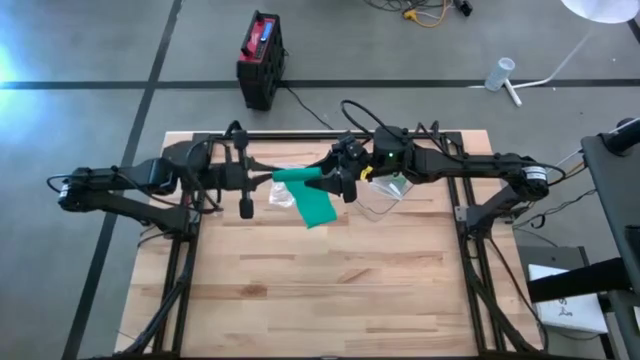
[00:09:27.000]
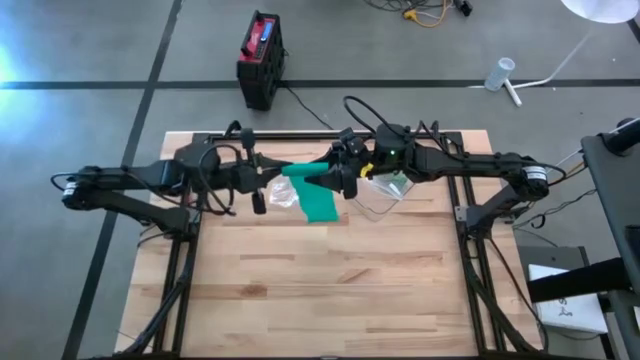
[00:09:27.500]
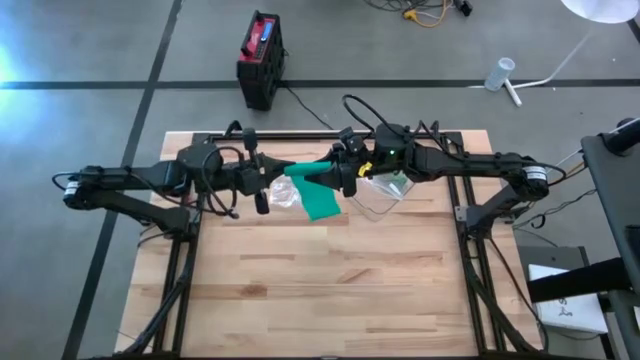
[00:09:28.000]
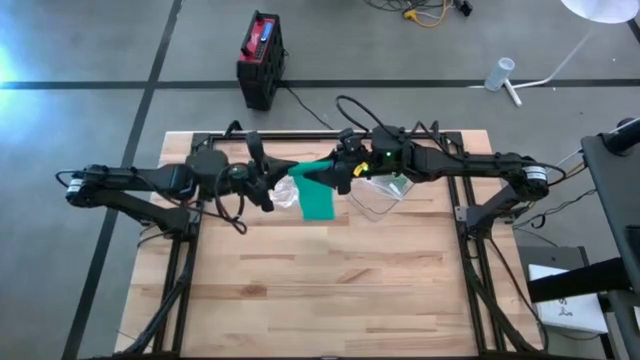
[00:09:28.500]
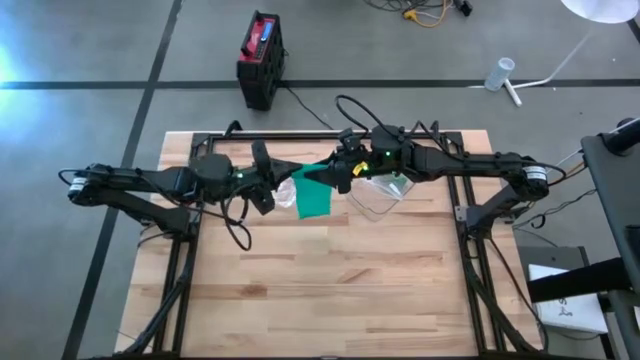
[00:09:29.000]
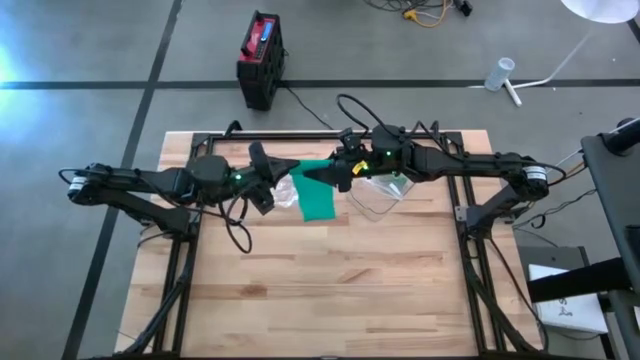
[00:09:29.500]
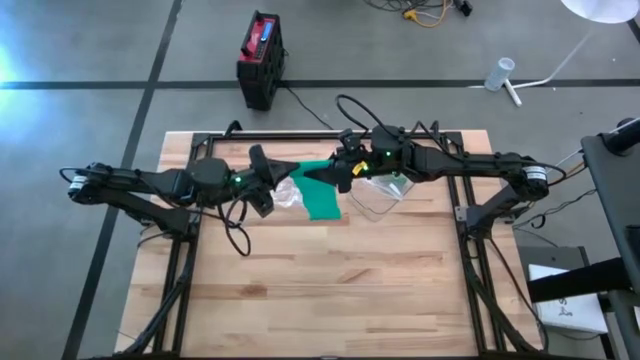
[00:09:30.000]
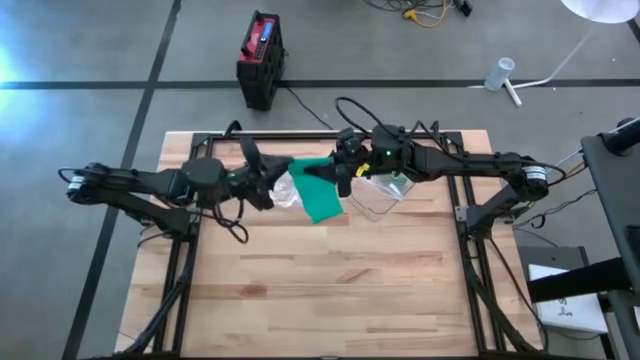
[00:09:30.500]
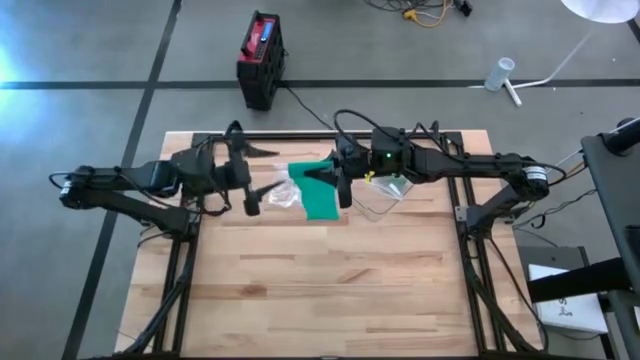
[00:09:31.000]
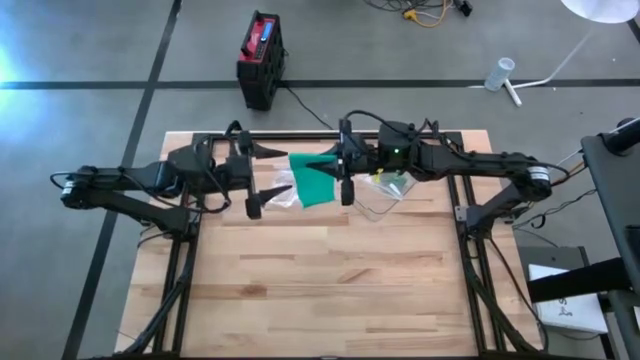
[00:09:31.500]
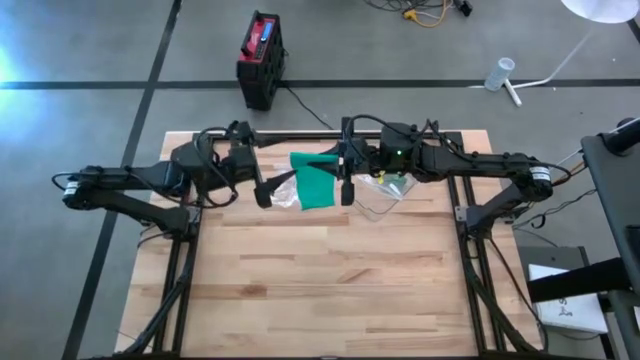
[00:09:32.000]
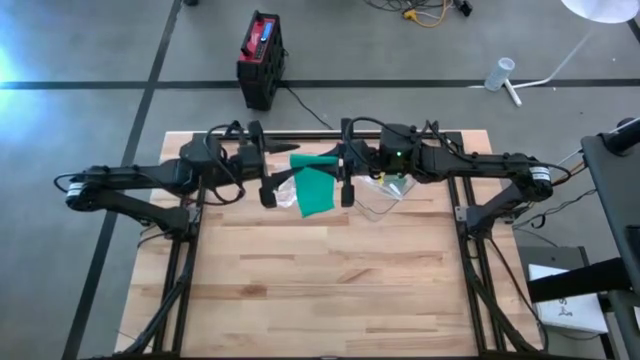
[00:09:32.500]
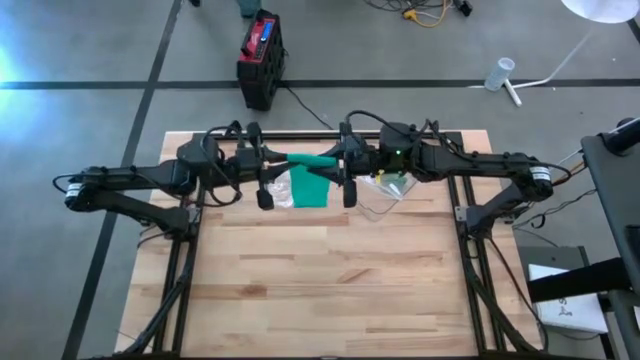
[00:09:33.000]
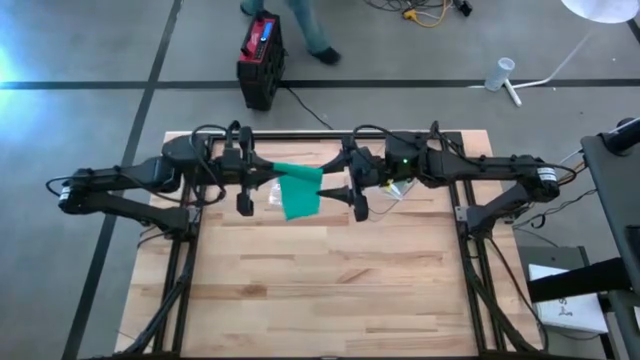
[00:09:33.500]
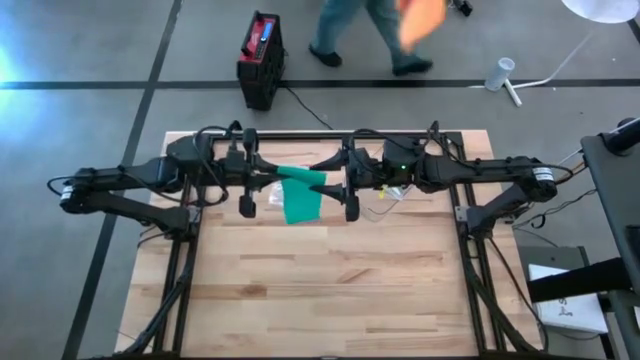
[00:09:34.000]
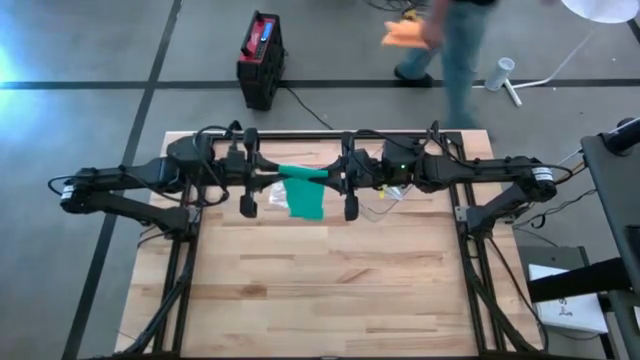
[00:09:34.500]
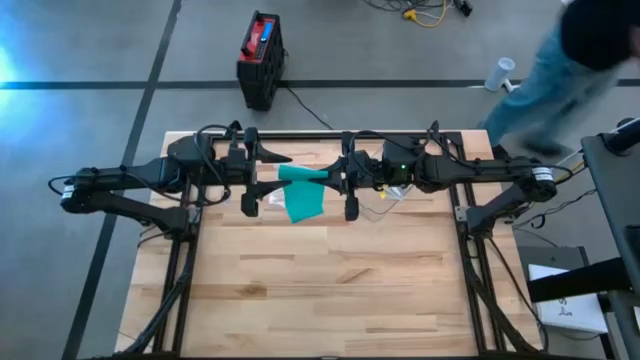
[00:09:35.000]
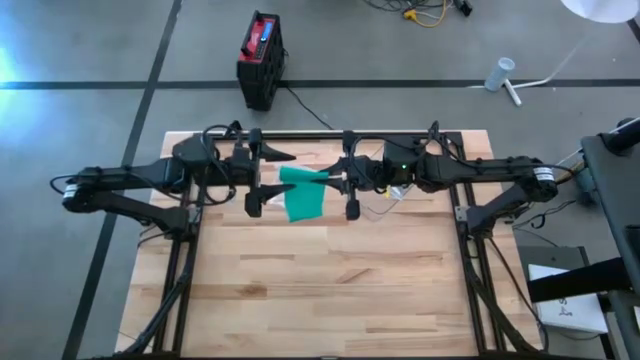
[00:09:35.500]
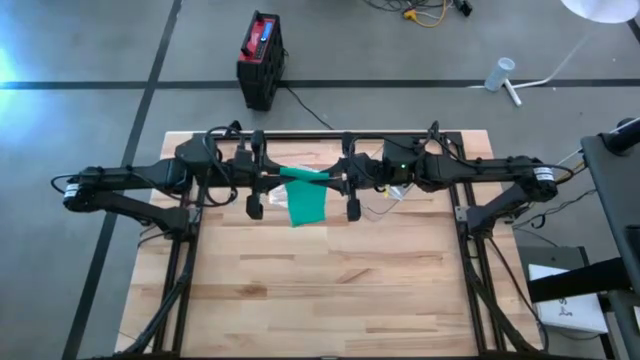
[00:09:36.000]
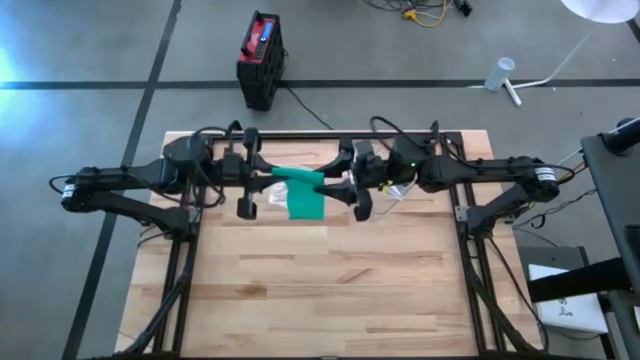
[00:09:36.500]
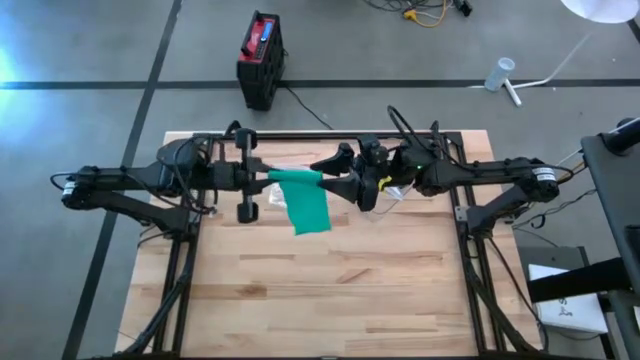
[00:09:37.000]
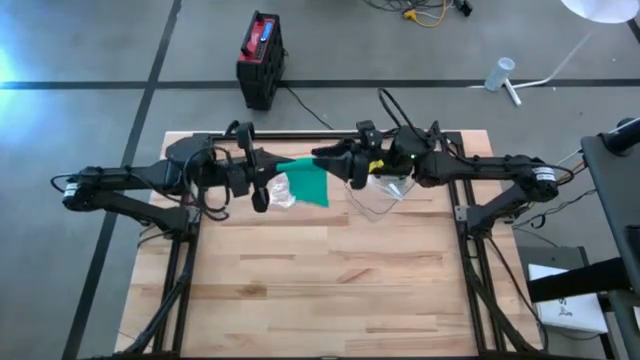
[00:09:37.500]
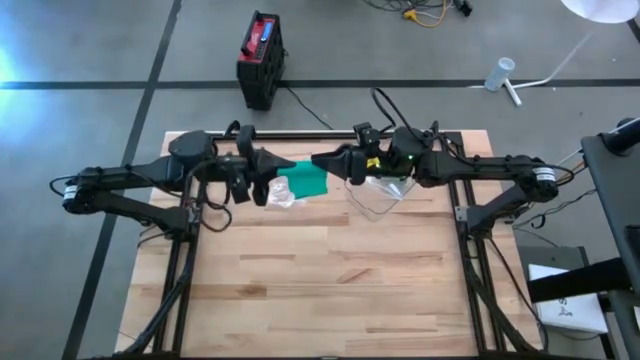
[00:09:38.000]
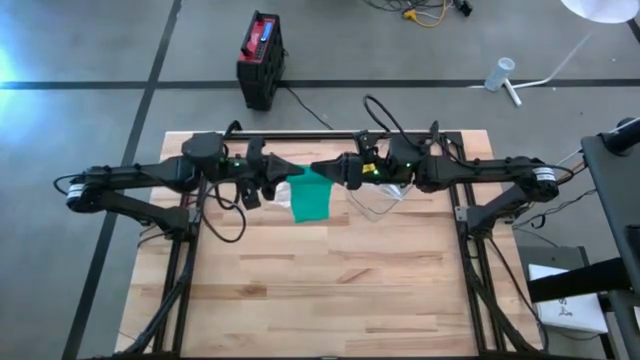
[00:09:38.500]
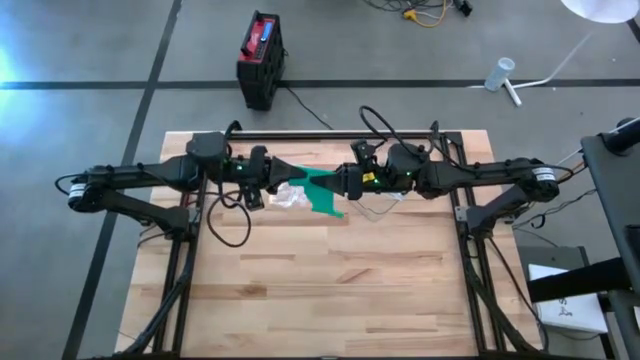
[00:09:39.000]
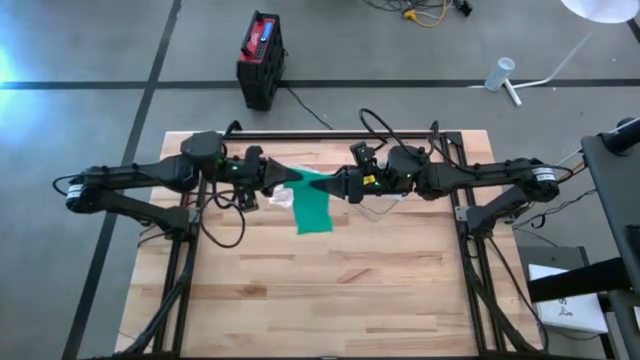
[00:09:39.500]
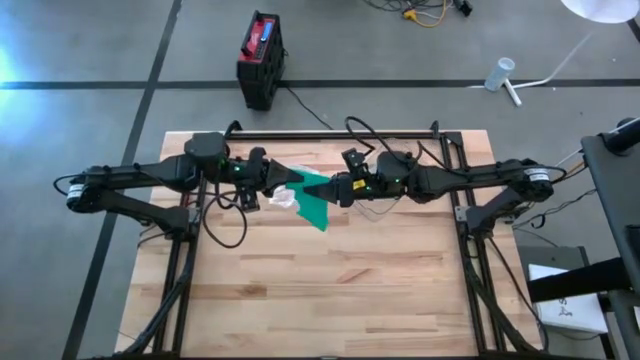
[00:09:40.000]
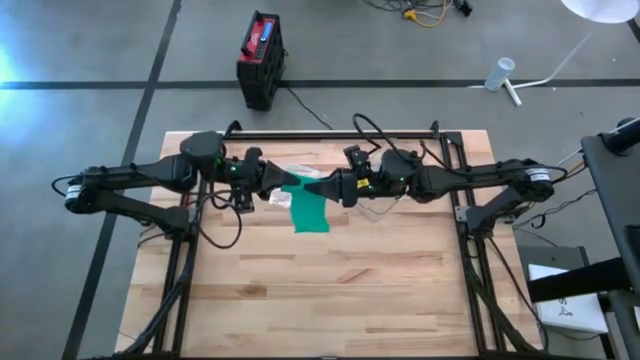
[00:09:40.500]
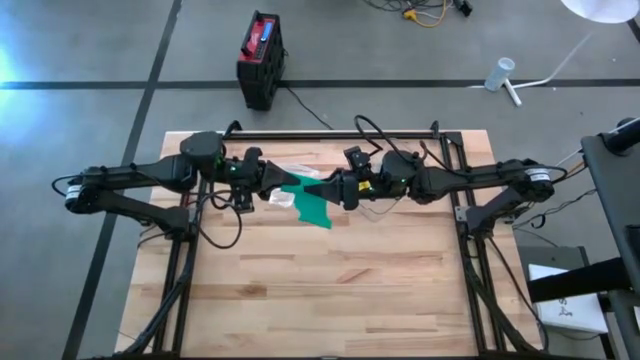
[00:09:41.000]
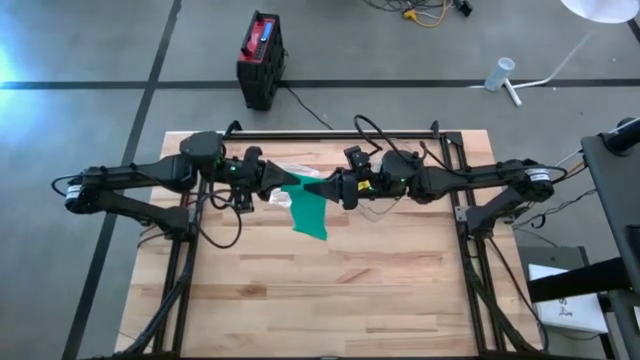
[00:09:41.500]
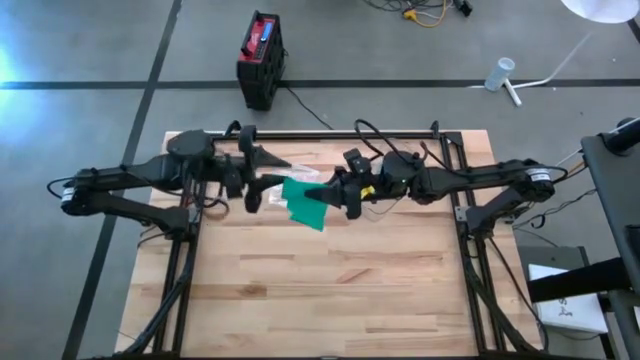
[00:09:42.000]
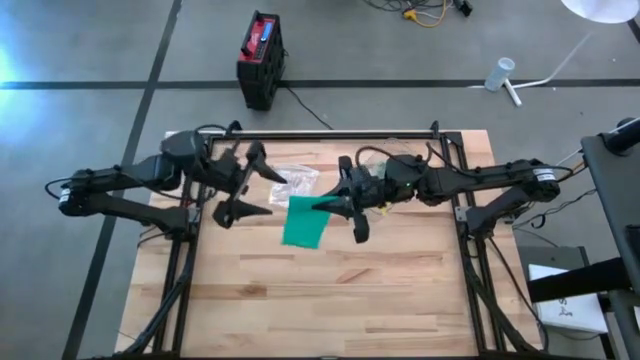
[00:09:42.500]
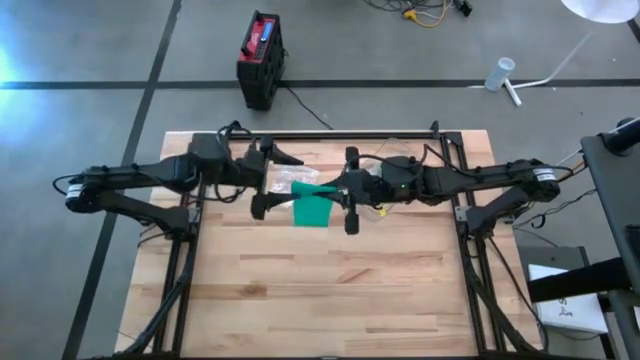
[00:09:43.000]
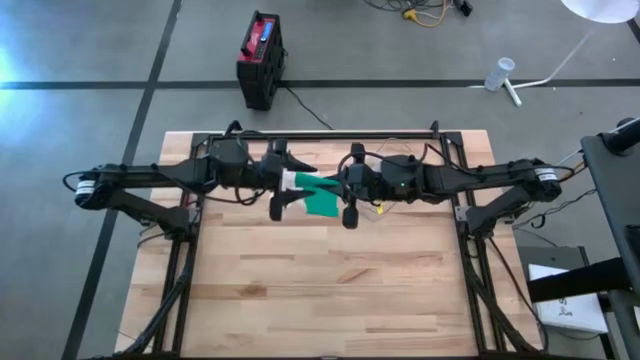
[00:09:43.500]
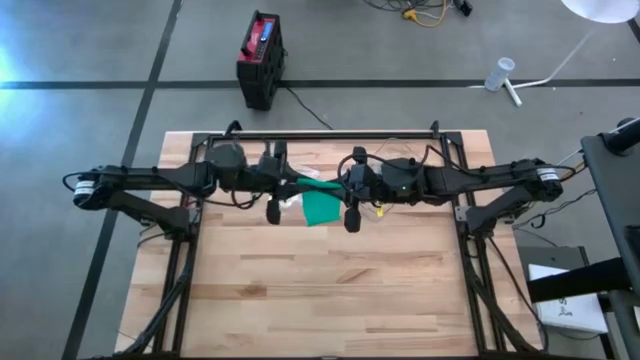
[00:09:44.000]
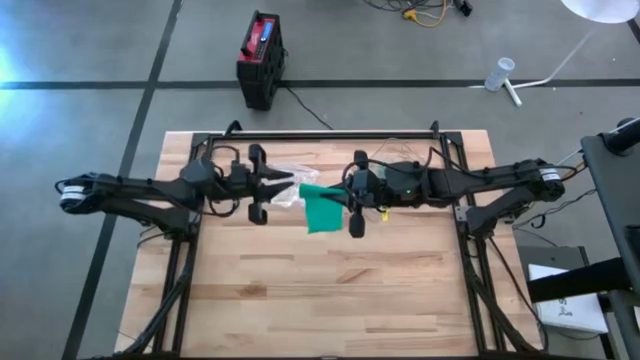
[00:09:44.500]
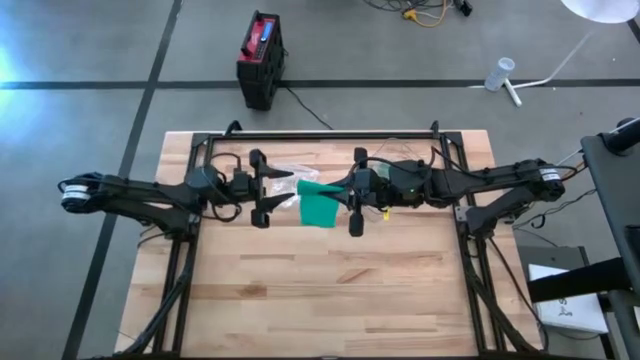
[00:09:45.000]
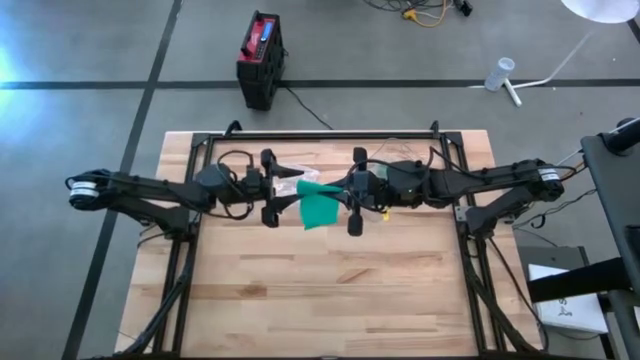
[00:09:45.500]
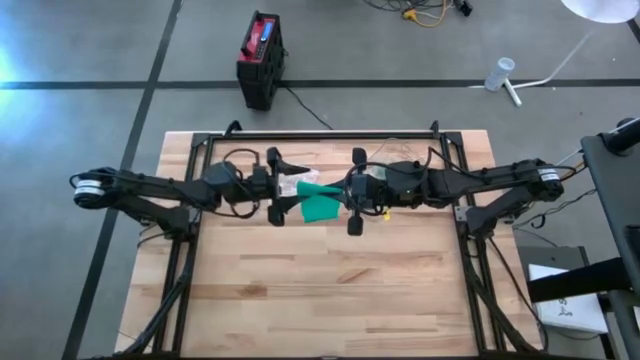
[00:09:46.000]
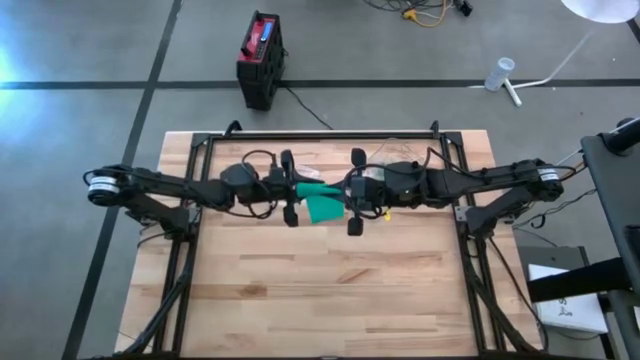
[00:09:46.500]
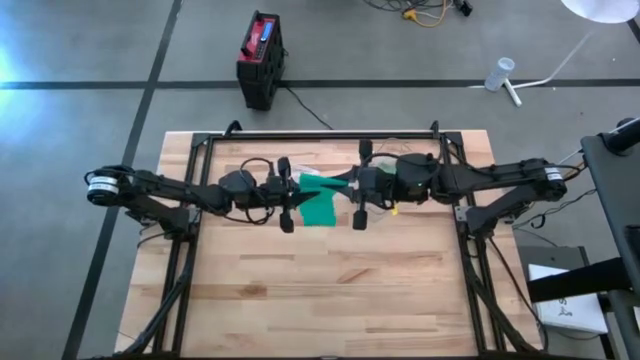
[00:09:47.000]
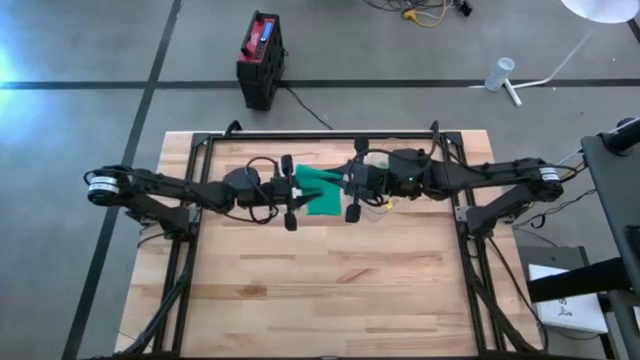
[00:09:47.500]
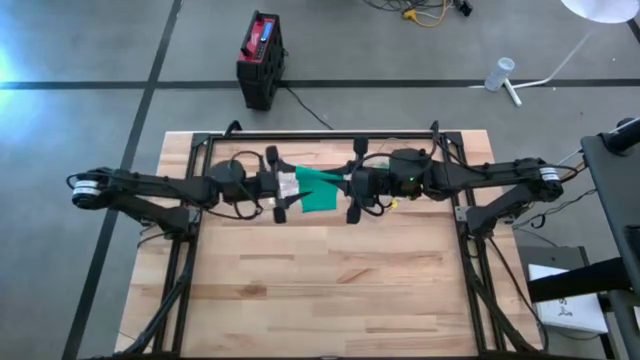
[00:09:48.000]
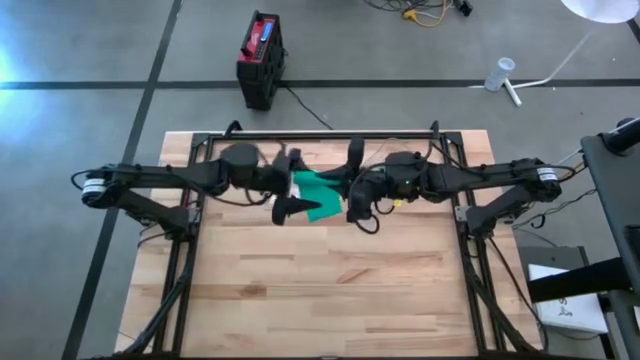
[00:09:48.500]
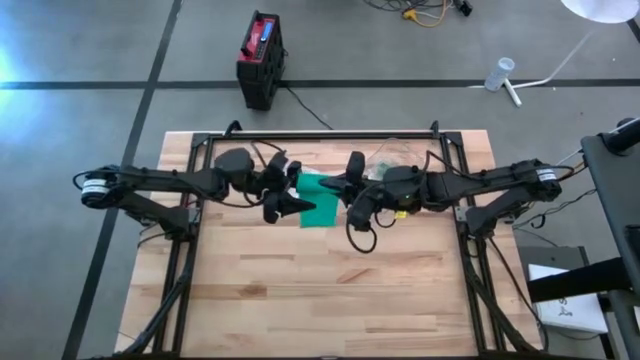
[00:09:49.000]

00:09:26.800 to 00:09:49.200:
Task: Roll bandage
Roll the dark green bandage
